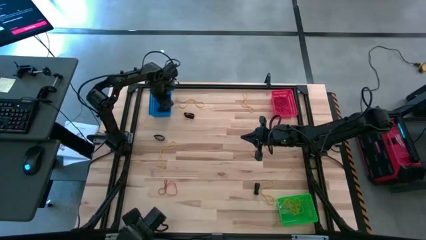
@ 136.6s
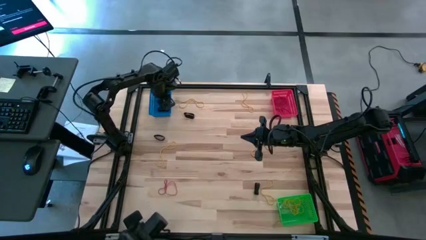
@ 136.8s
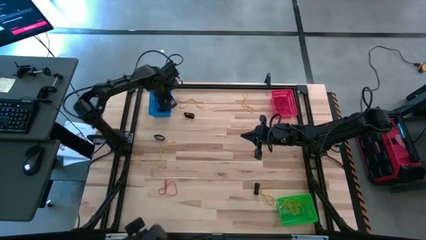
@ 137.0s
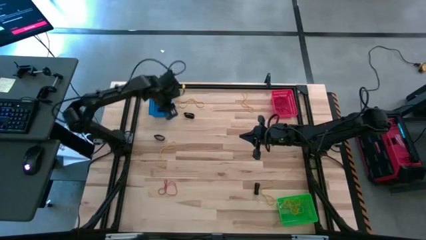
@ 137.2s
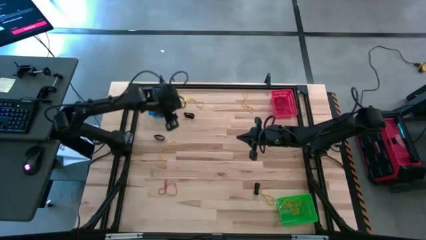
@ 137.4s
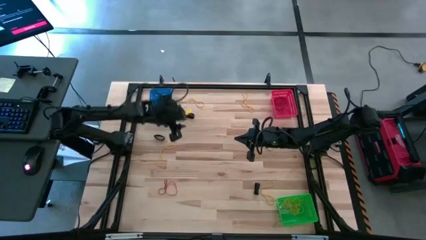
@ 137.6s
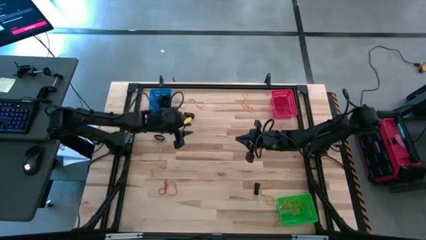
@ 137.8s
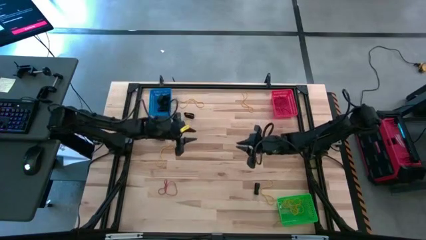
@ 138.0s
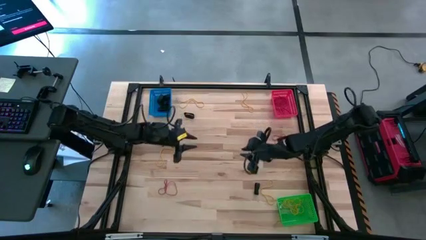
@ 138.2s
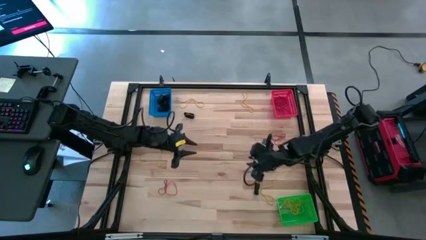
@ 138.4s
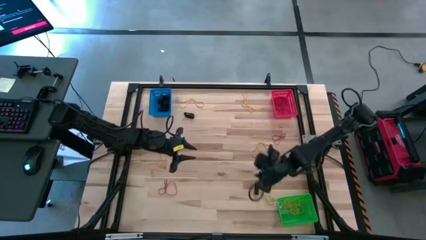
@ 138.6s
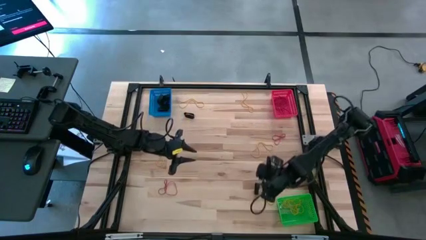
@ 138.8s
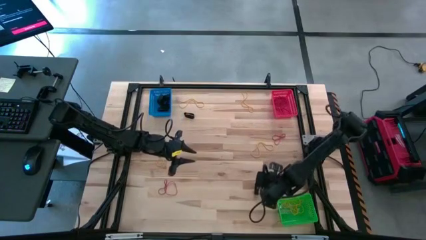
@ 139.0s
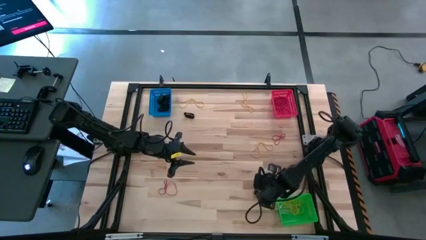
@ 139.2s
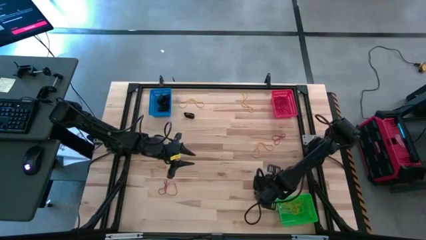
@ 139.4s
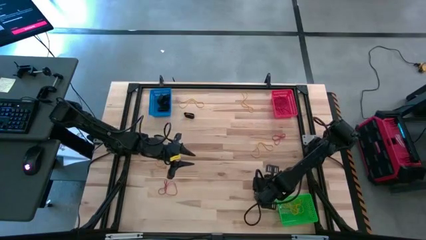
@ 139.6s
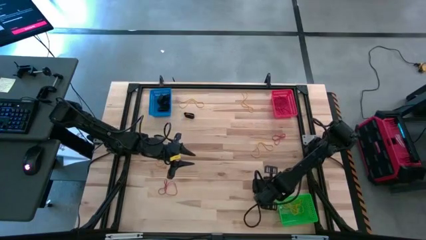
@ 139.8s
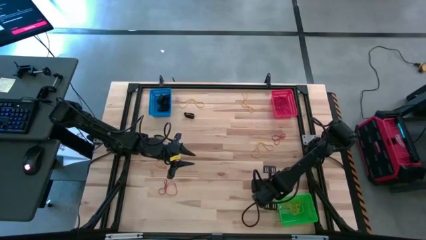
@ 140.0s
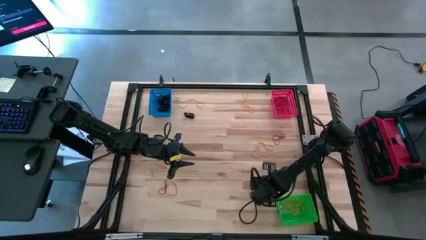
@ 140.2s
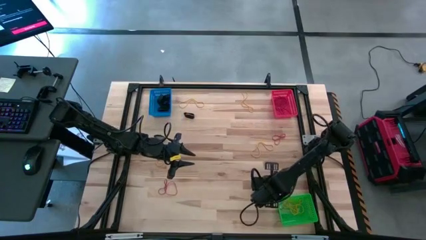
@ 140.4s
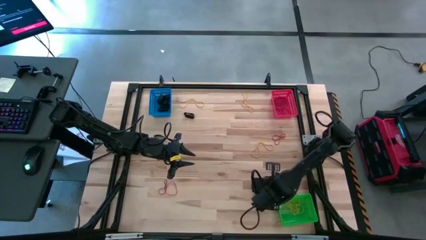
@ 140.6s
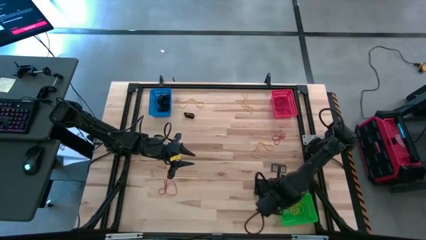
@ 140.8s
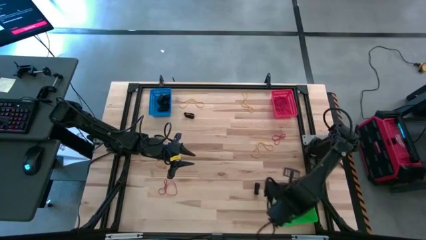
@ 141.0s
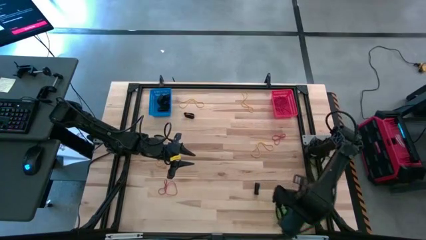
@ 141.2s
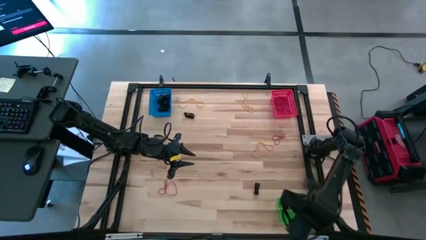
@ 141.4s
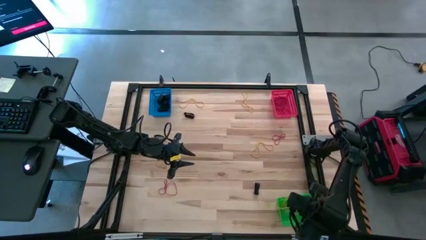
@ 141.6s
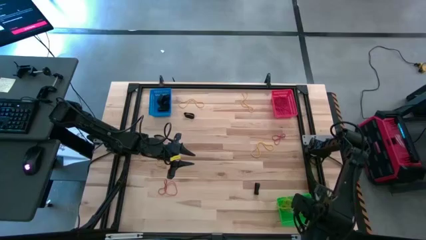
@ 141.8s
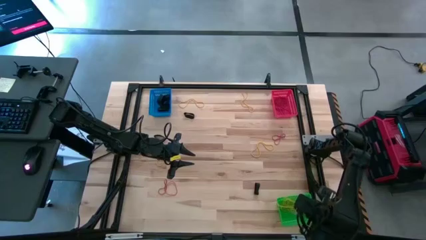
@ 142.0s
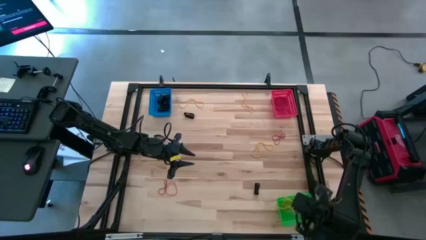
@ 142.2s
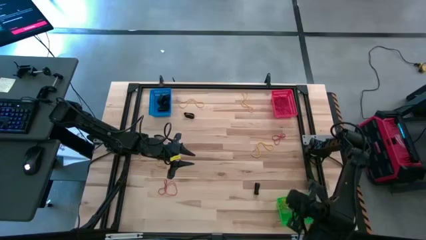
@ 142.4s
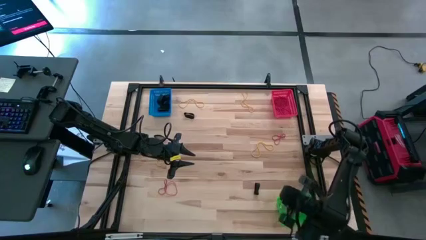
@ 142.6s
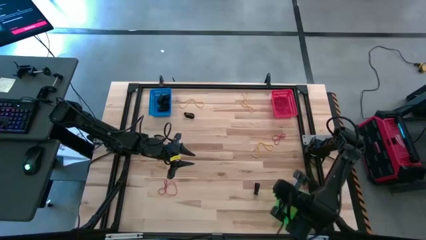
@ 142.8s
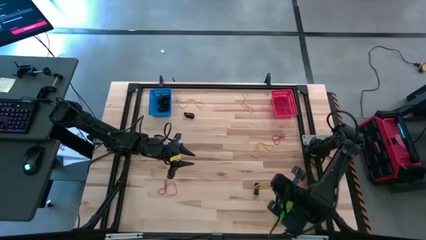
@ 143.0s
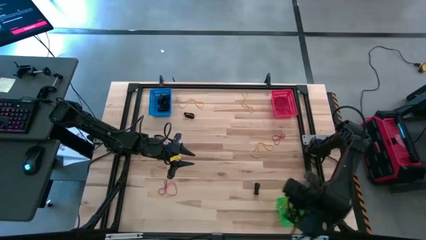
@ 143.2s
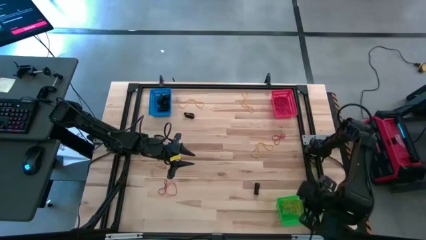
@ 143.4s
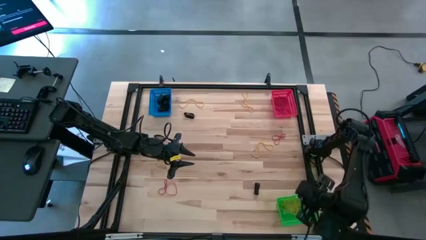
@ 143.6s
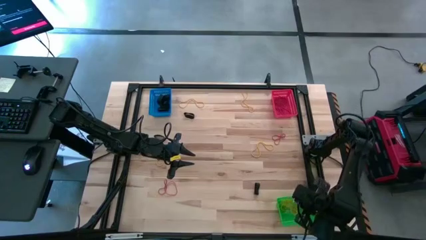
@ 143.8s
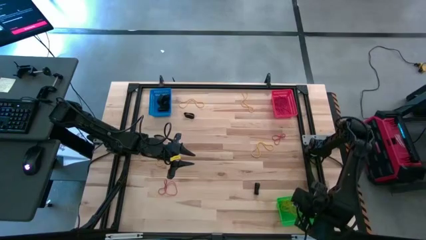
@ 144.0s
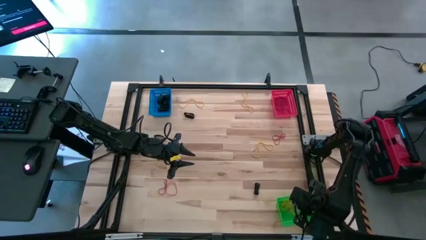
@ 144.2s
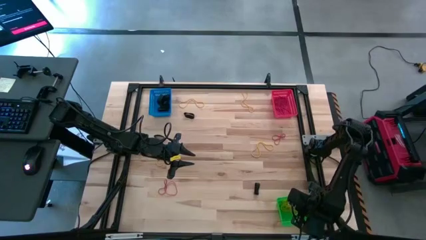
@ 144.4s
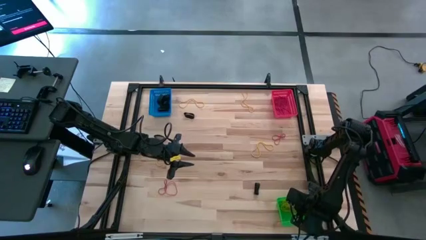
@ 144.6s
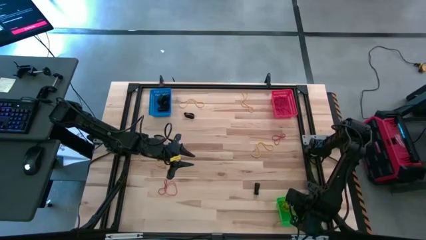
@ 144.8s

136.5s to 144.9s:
Task: Sort rubber bands into baskets
Put the yellow rubber band into the green bin

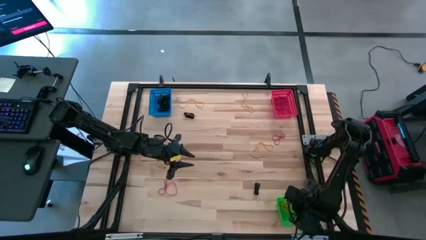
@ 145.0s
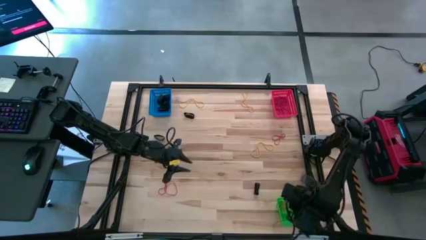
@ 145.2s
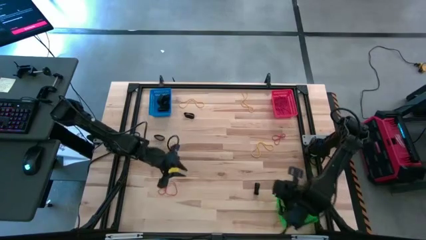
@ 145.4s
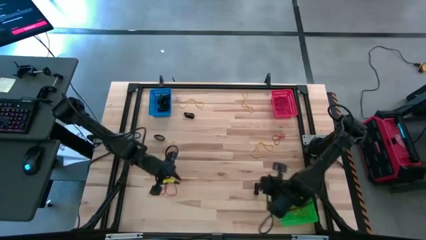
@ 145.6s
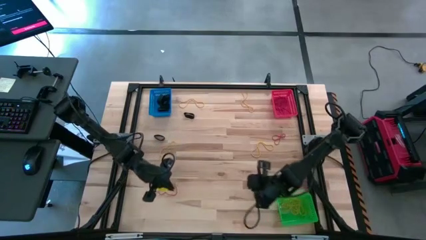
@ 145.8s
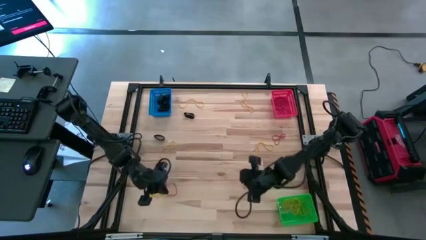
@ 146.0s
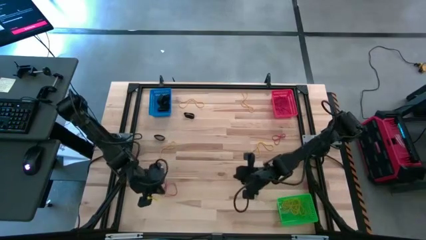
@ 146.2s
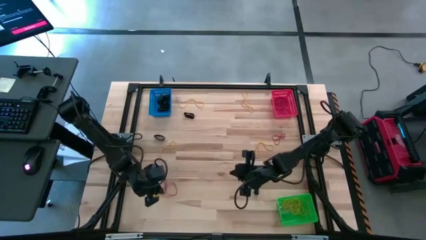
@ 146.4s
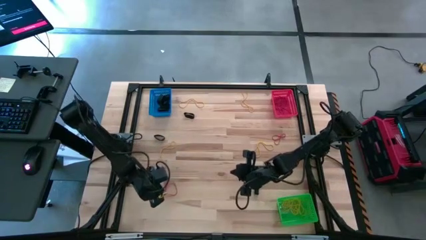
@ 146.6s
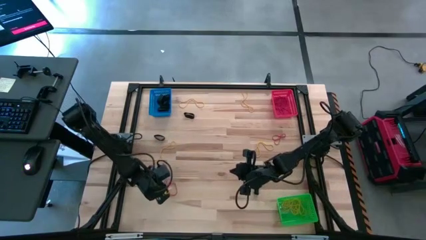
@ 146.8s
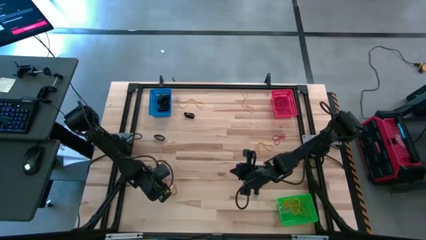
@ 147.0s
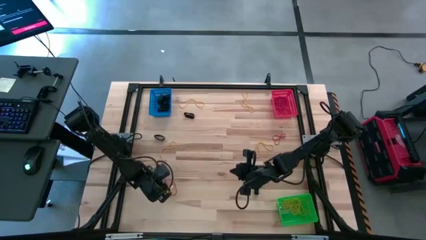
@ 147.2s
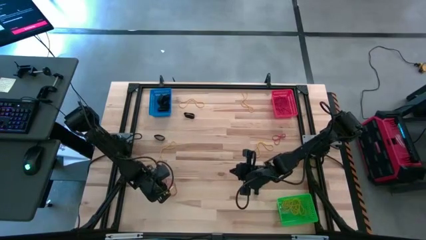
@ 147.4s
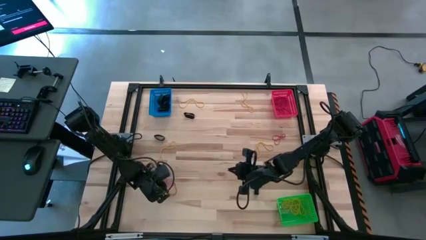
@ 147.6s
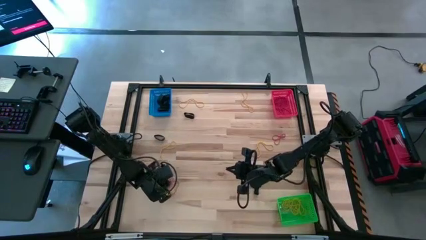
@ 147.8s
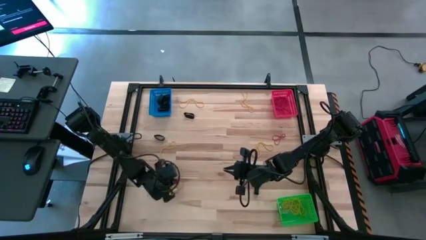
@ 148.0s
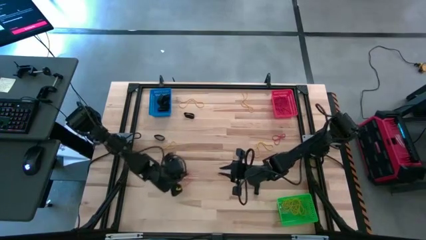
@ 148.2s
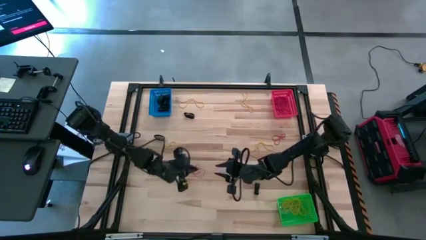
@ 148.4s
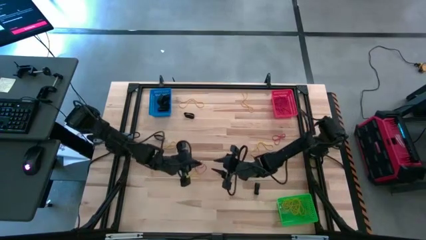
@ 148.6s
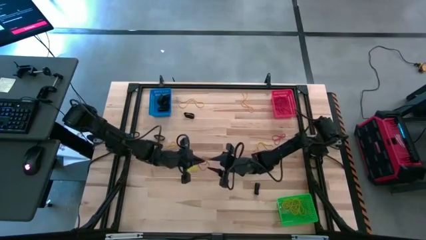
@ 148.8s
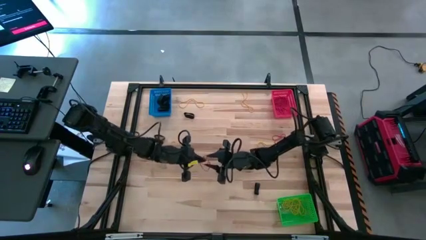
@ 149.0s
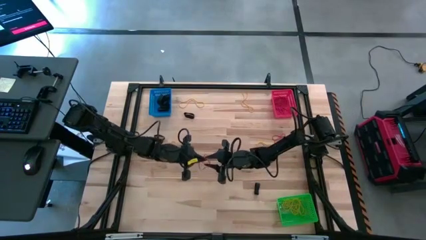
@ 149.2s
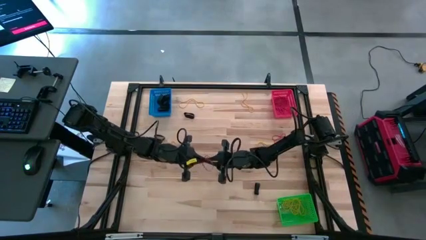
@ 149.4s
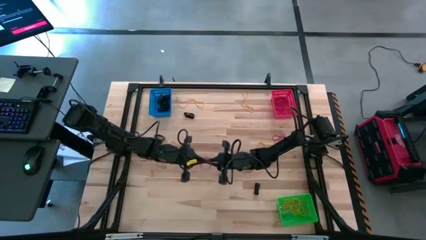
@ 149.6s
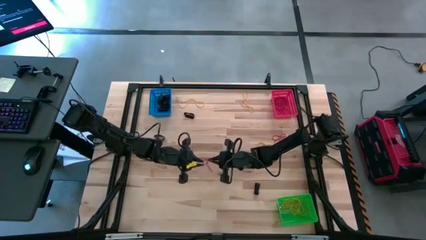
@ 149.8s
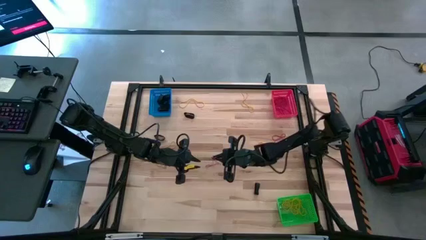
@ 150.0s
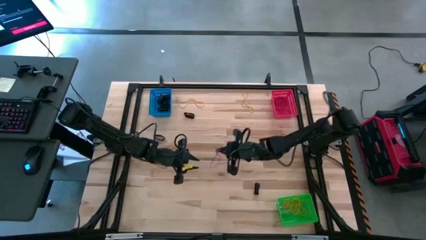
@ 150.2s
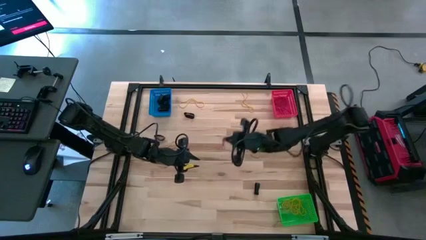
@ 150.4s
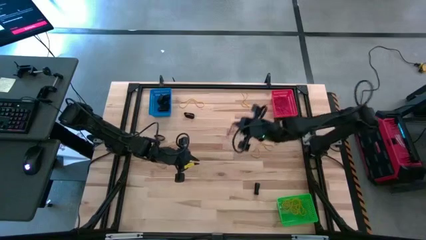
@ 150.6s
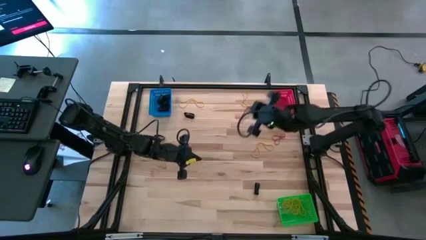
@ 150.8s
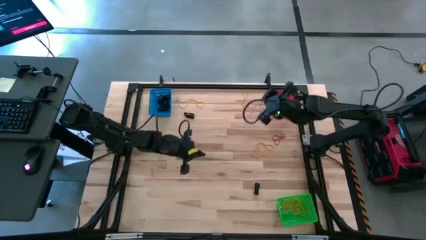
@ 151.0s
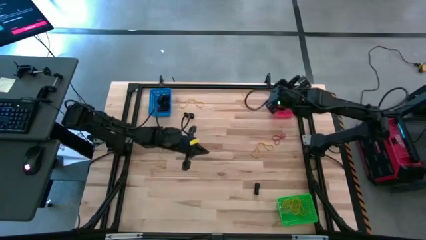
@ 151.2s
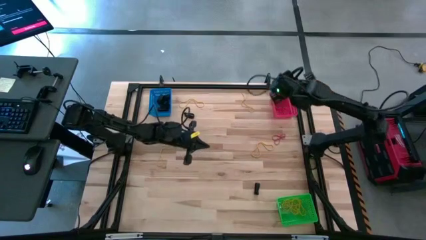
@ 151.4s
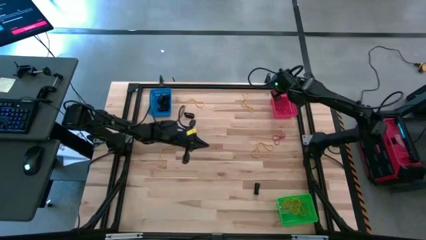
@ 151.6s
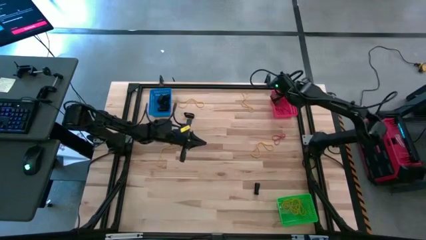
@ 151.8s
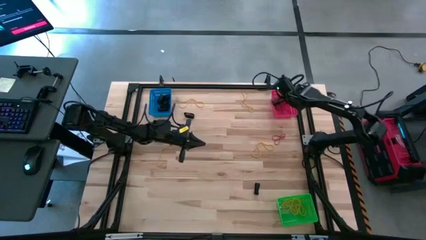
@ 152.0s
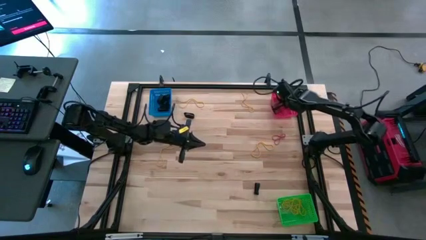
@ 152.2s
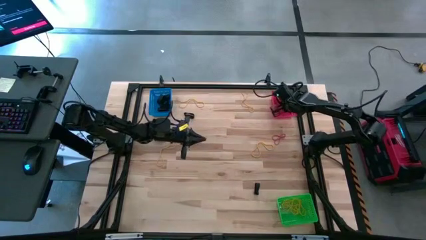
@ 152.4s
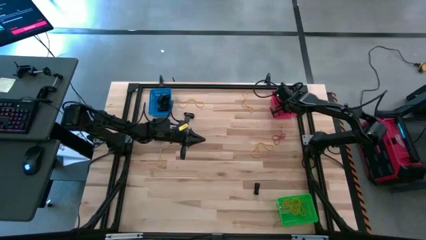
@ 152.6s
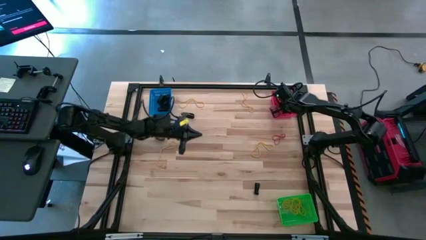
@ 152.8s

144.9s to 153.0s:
Put the red rubber band into red bin
